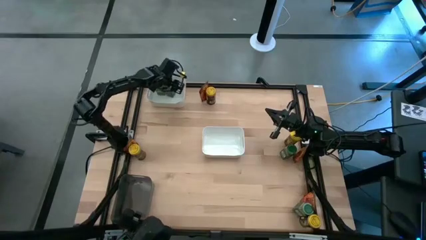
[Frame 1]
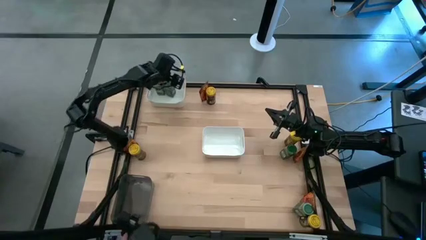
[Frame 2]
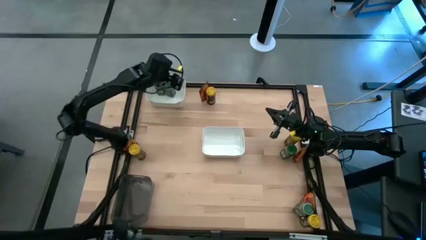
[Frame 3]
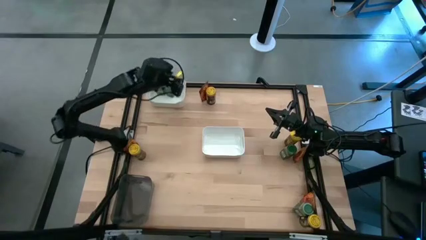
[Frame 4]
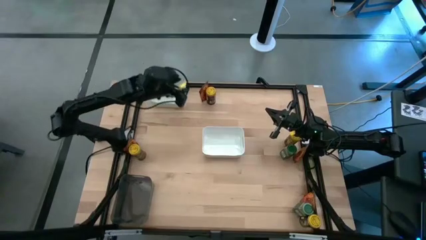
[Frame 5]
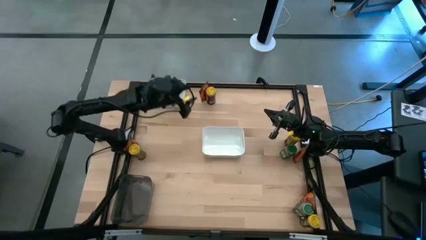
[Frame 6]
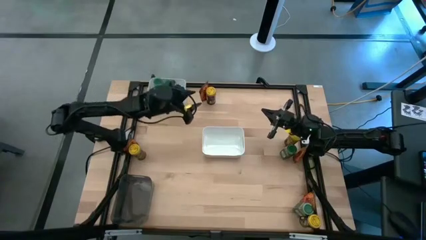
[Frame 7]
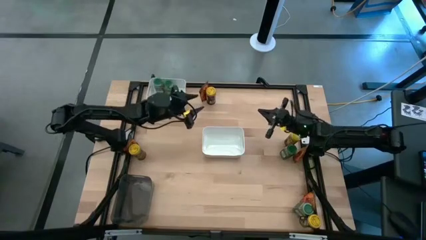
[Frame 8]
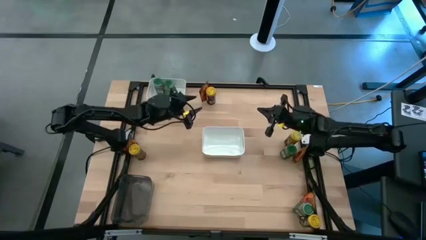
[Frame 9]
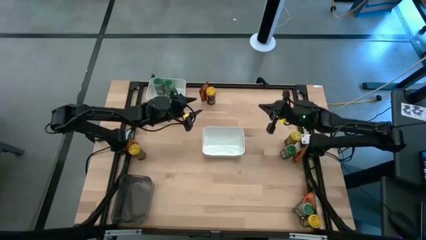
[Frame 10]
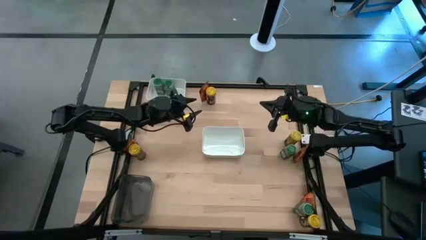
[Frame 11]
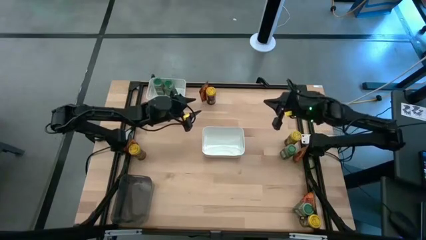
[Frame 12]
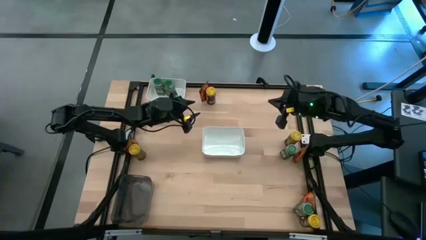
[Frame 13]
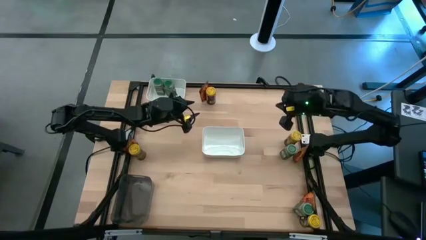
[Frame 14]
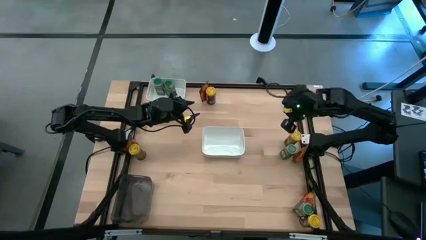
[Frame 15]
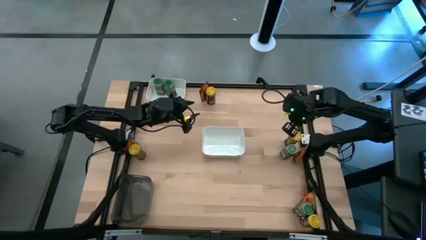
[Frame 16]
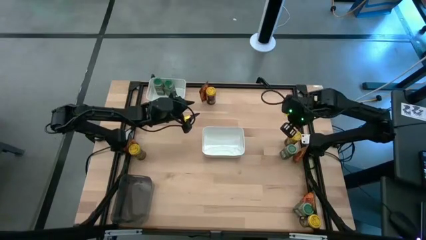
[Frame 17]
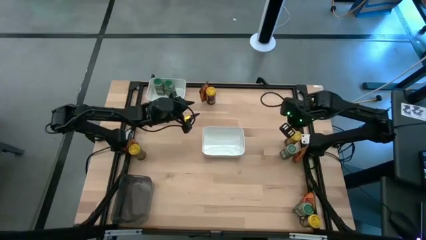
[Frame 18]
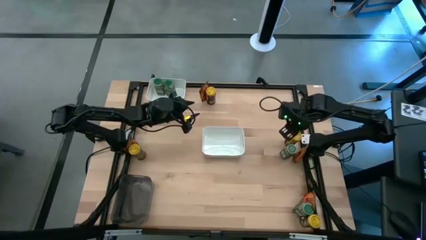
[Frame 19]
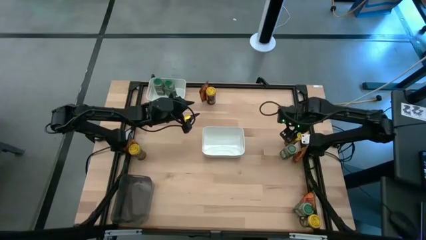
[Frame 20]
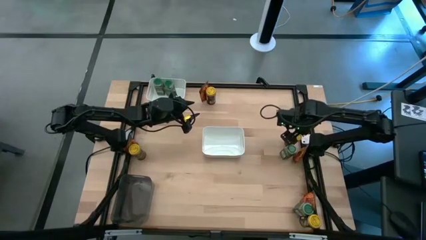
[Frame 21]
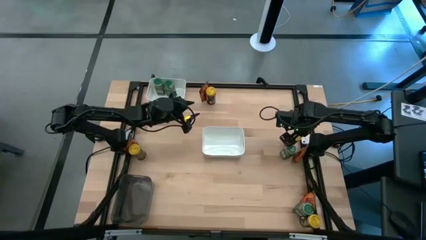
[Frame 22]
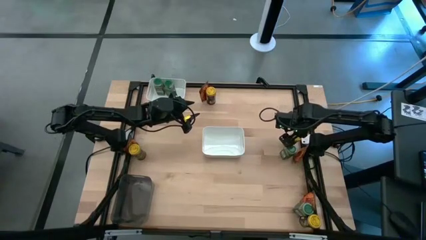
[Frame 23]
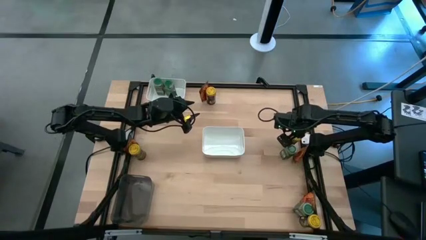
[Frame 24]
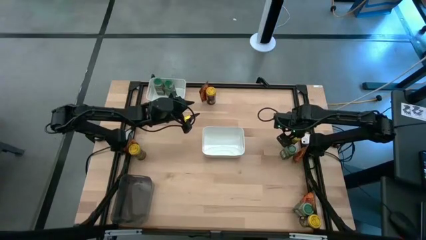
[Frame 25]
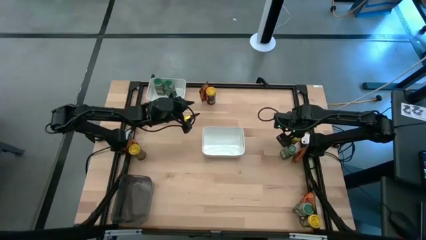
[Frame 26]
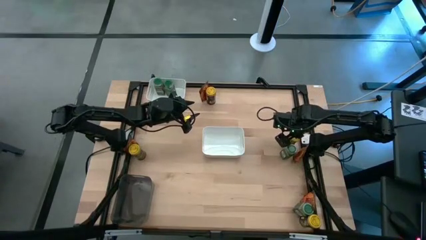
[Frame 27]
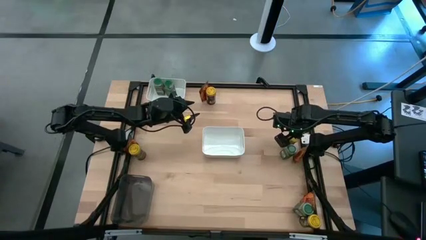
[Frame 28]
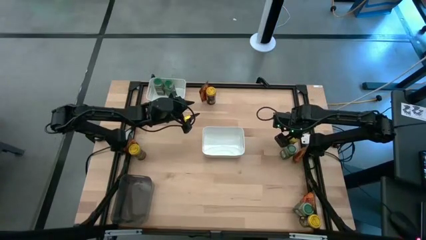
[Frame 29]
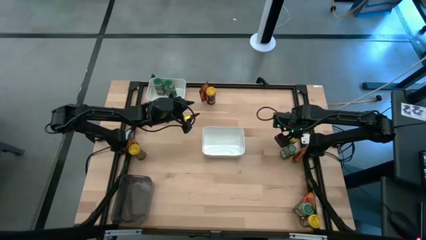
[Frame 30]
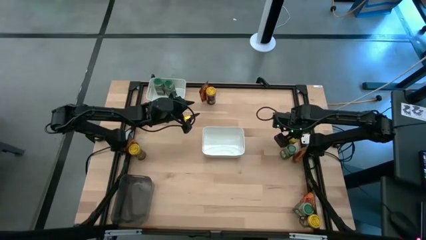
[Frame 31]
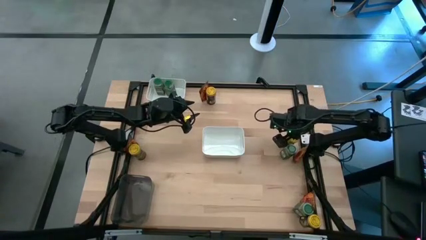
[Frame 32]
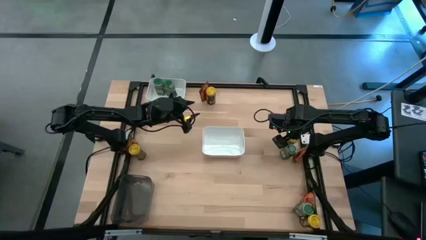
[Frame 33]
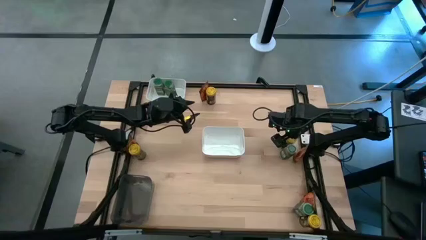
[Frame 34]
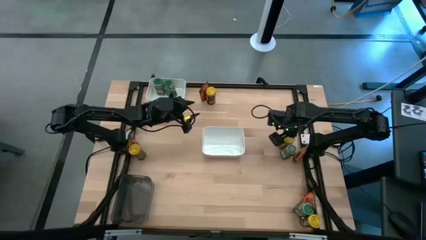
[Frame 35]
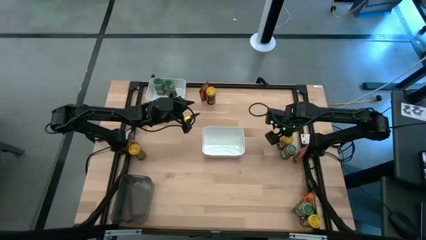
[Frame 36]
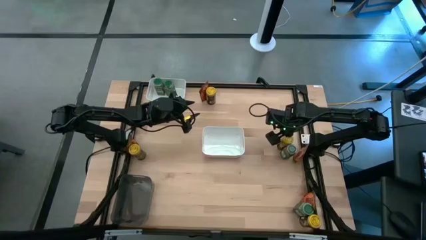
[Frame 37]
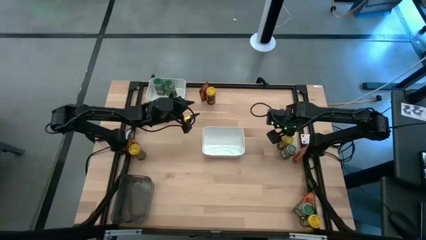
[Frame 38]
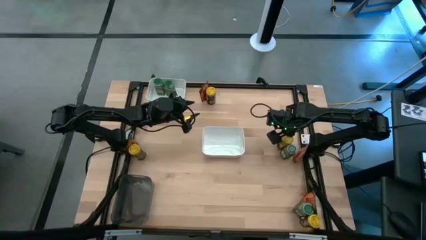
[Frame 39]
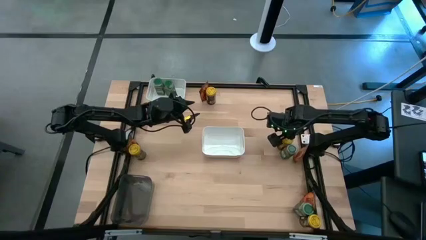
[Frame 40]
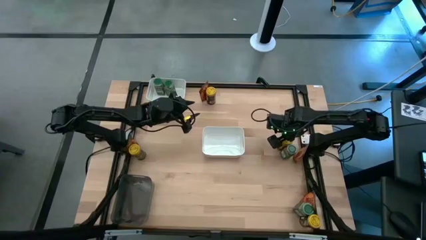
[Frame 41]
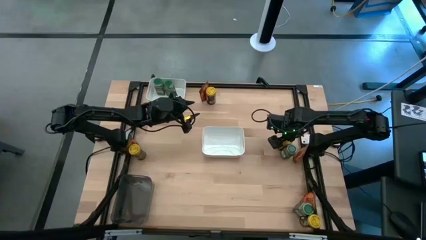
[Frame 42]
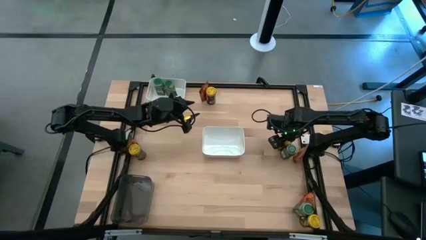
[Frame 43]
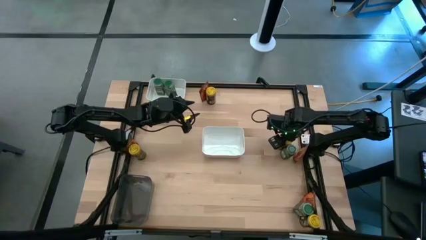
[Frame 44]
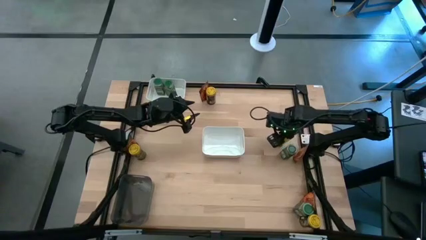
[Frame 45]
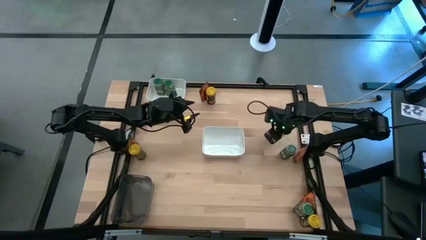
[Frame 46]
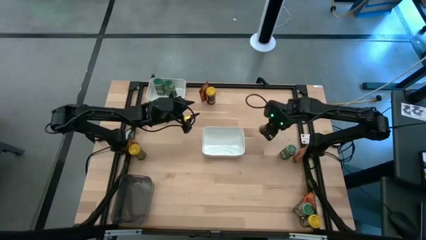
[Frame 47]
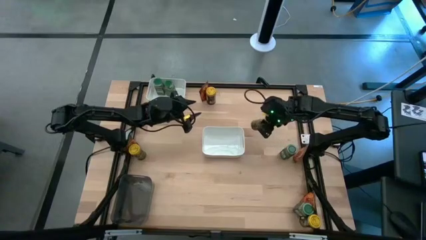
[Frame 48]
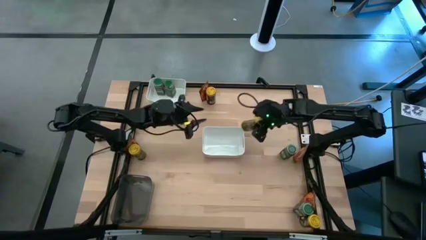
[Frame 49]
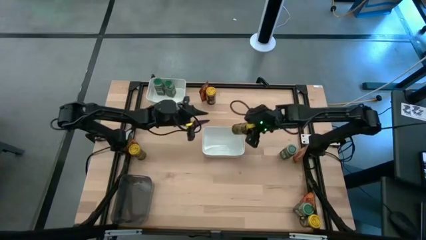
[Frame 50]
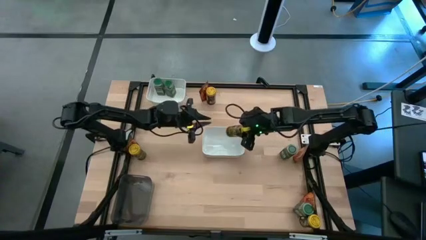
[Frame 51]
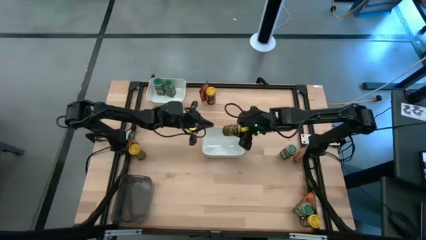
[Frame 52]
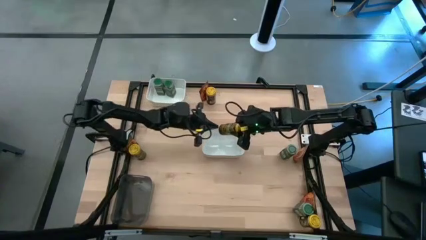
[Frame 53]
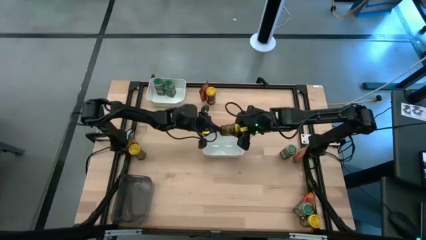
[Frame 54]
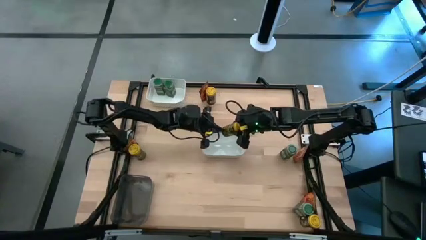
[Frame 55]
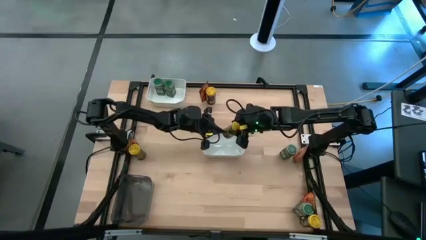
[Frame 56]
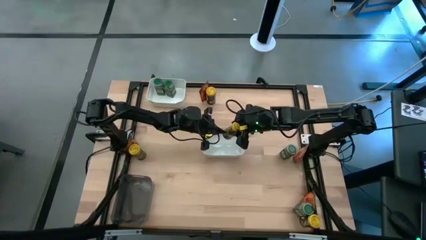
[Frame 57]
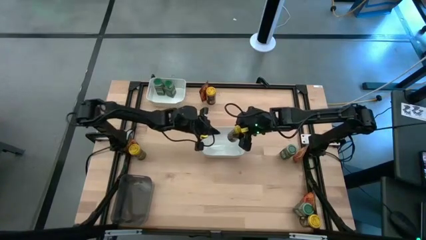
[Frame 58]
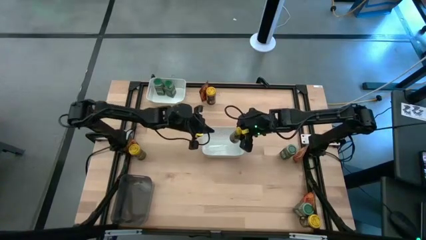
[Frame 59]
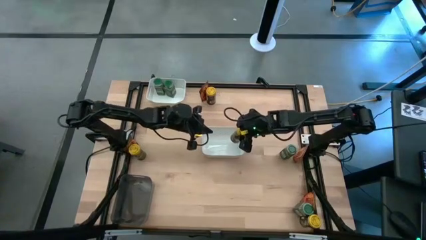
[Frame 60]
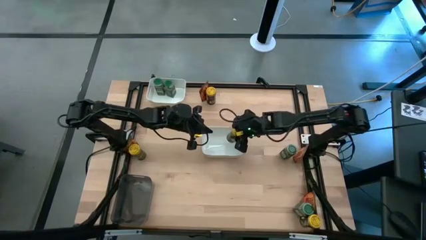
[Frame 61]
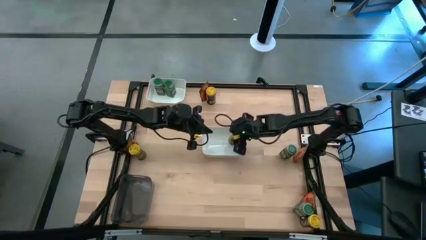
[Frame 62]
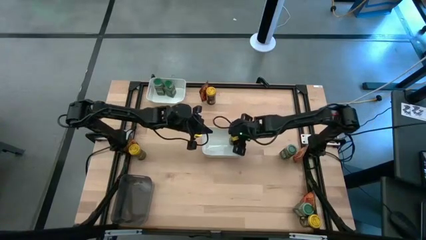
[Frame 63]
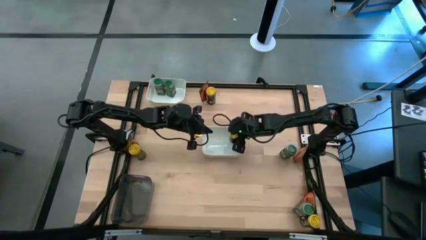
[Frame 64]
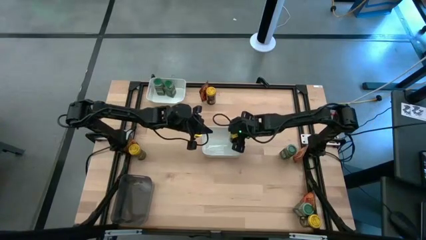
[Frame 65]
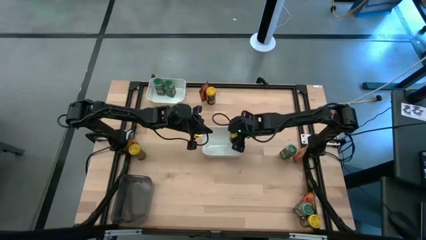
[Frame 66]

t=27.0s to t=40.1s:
Task: Sort spices by type
Put the yellow seasoning bottle into the bottom white bin
